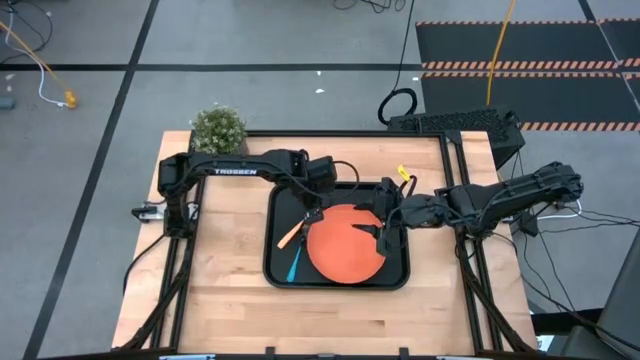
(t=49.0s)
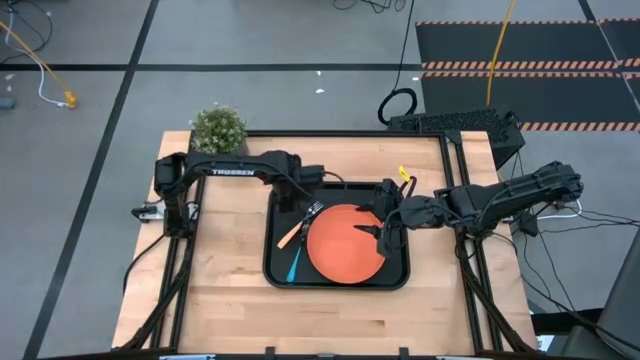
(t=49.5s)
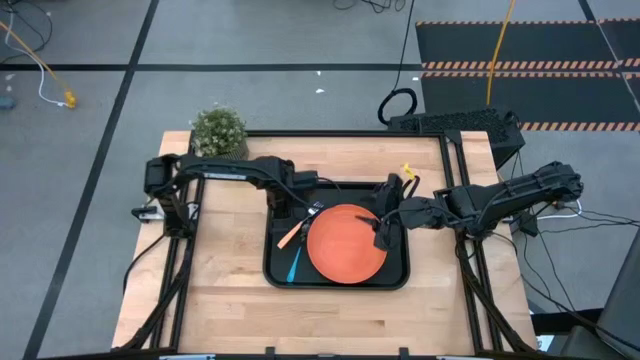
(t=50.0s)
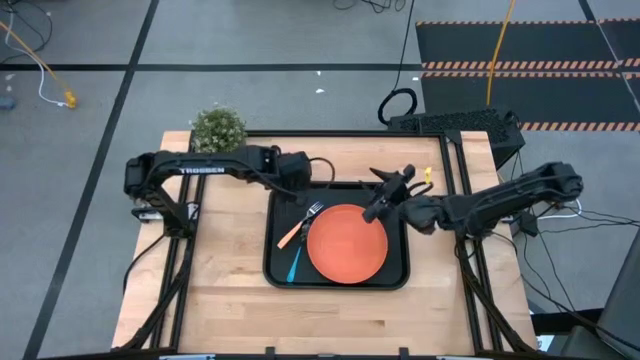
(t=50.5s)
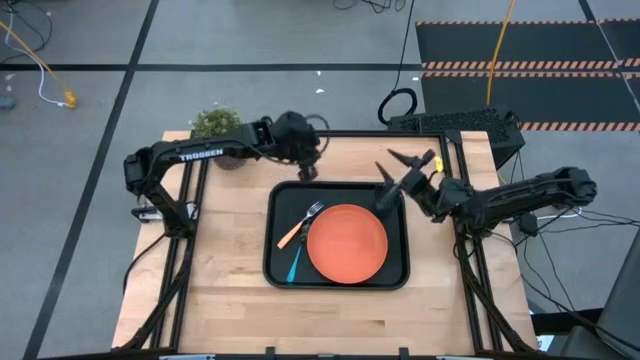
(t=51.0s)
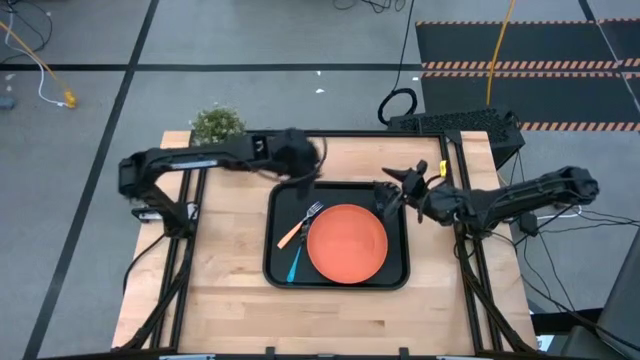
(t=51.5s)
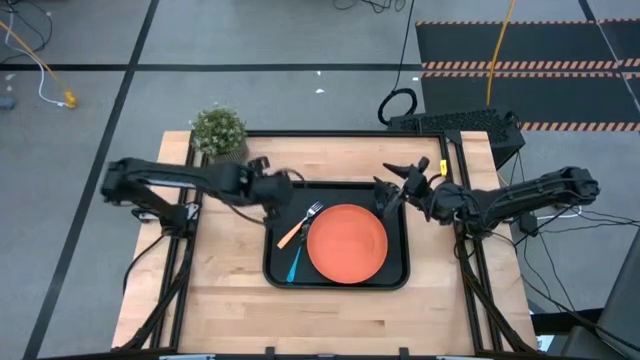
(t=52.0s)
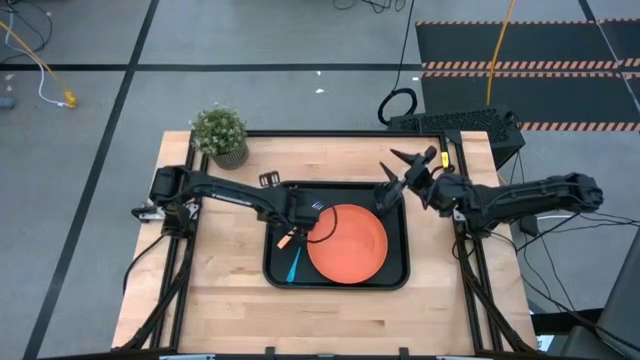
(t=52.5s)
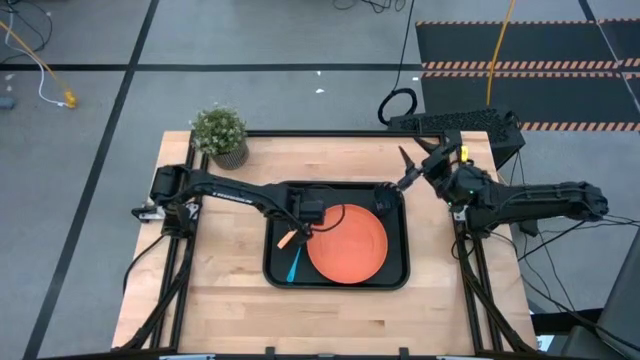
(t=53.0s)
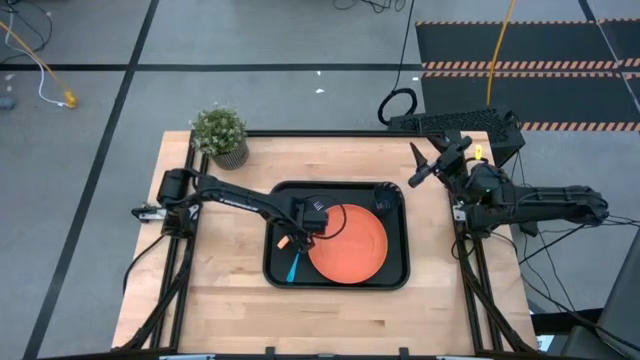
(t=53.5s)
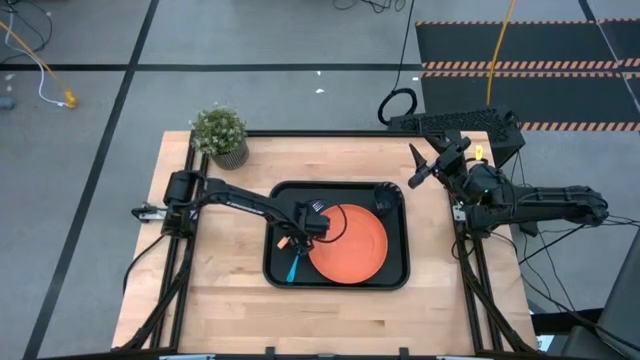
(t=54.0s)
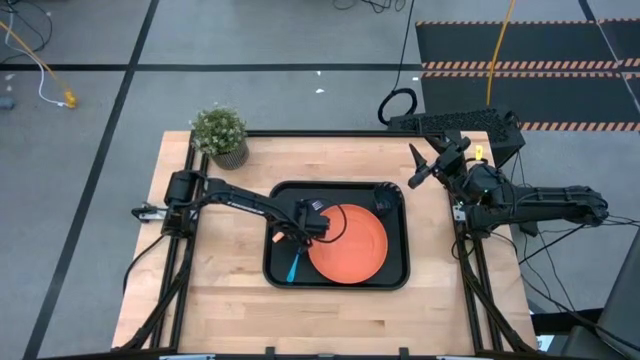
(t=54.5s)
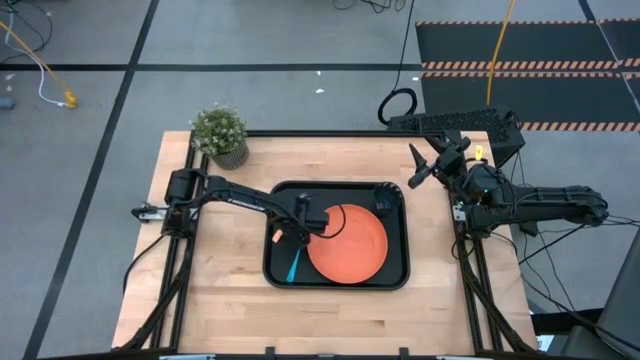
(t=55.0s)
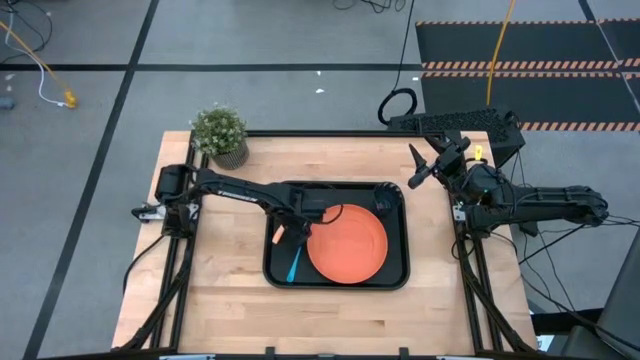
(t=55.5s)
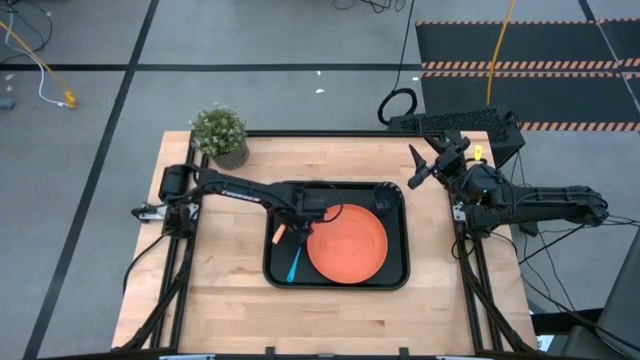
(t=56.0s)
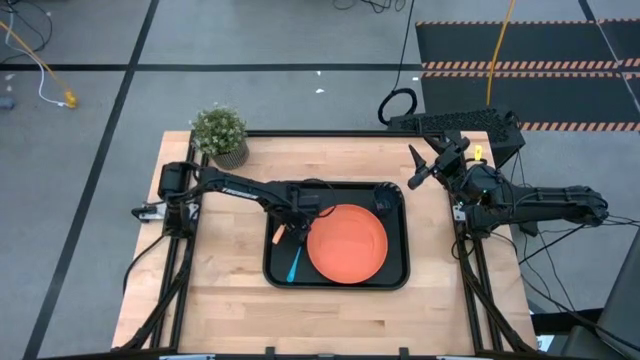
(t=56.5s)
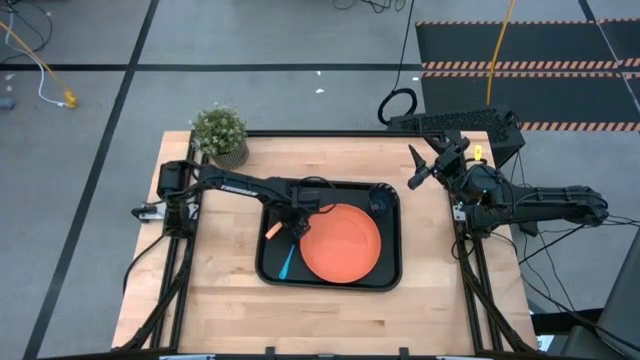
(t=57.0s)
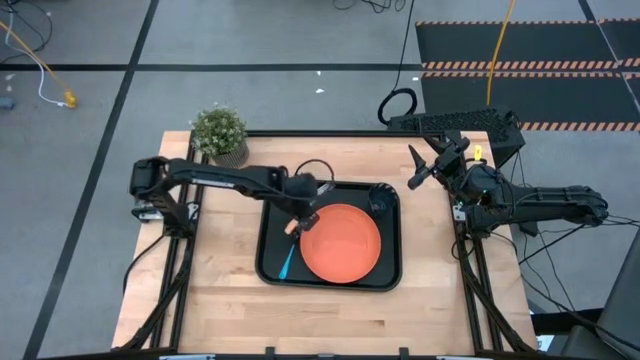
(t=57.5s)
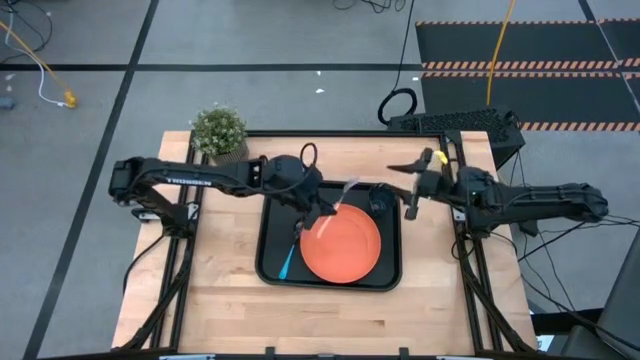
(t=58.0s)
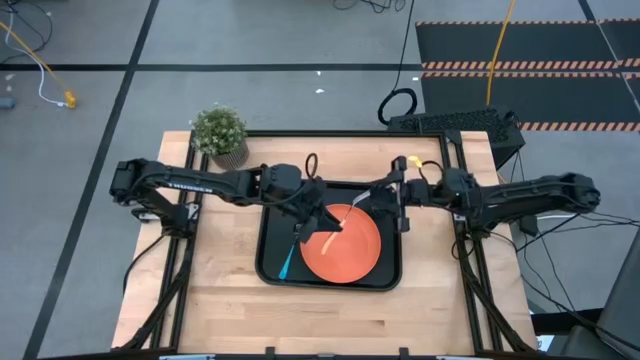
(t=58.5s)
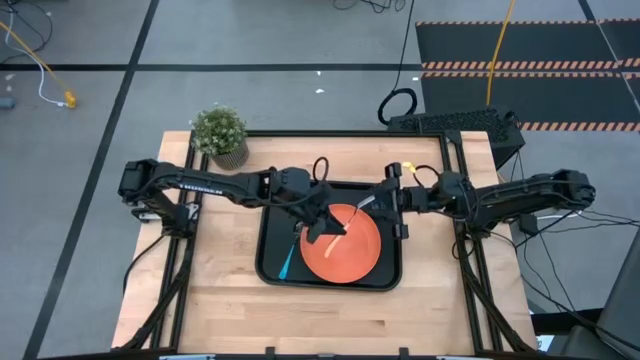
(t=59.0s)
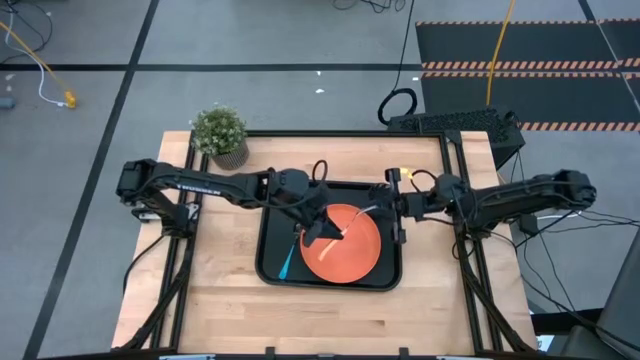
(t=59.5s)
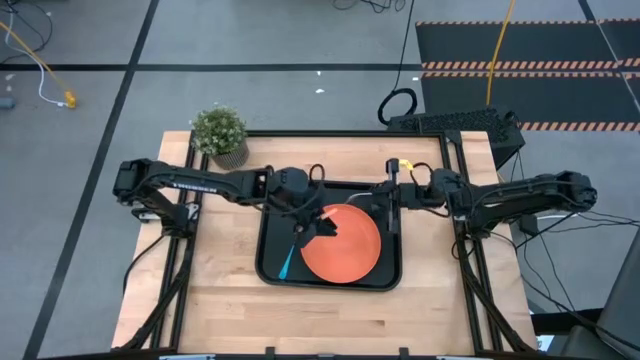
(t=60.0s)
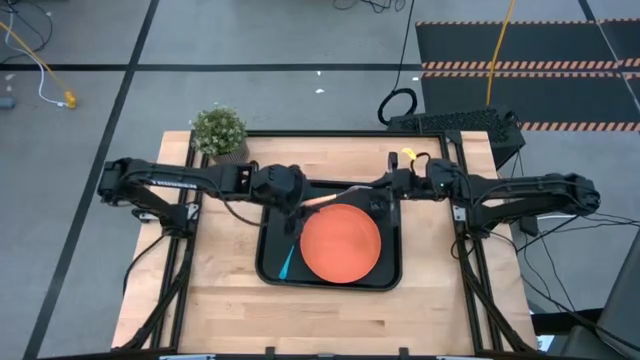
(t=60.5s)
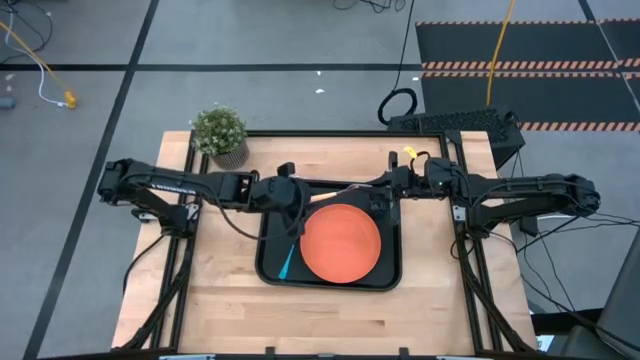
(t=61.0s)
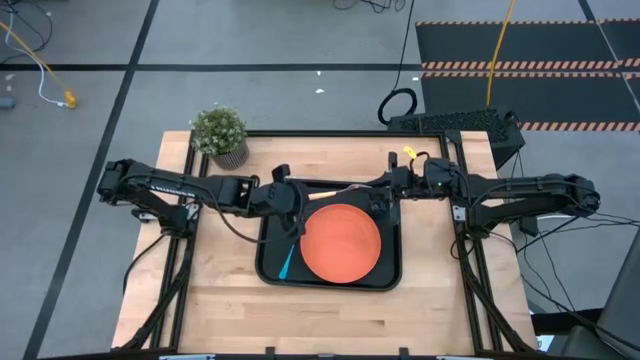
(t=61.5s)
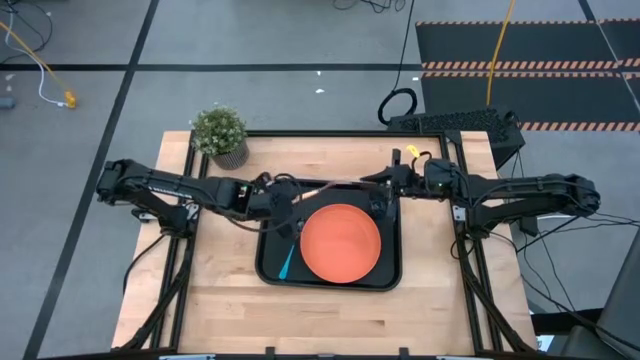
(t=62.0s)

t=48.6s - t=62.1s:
Task: Pick and place plate/cup/fork/spoon on tray
Adjust the orange fork on the black tray

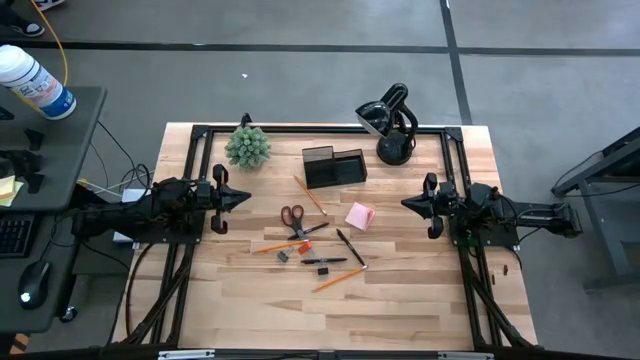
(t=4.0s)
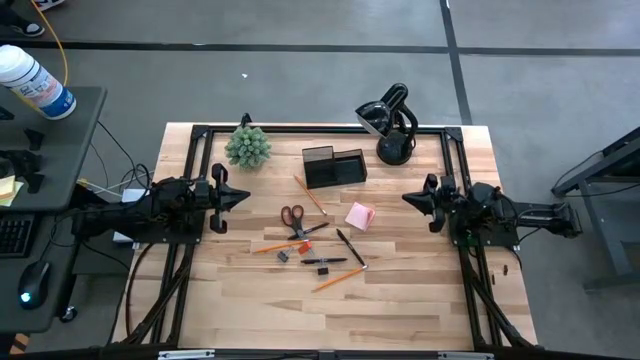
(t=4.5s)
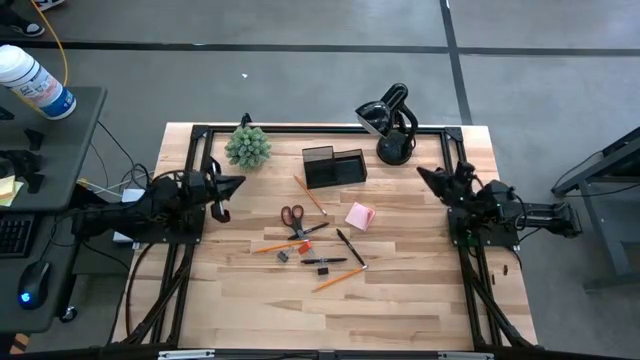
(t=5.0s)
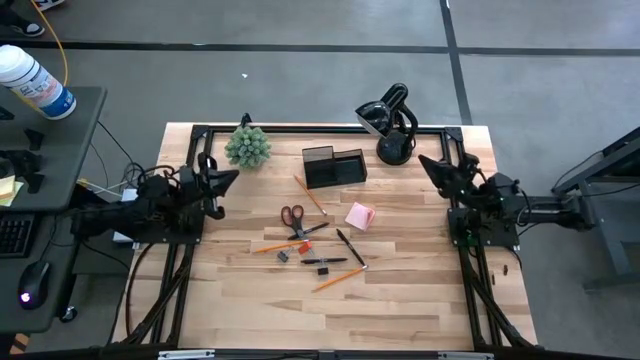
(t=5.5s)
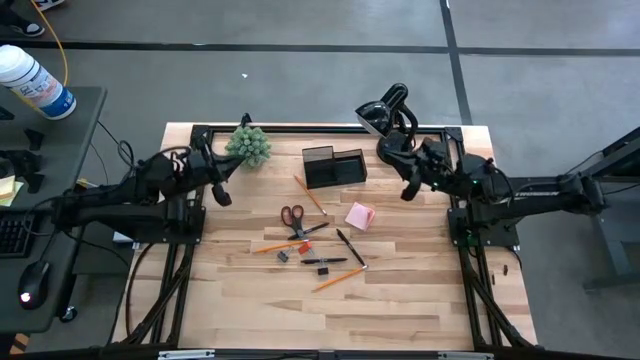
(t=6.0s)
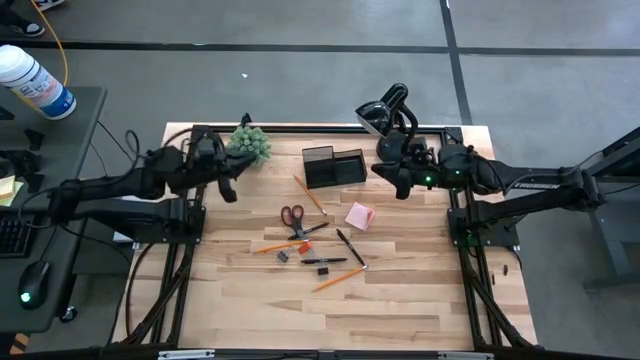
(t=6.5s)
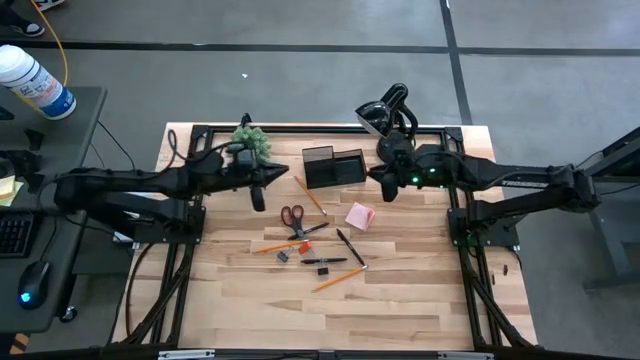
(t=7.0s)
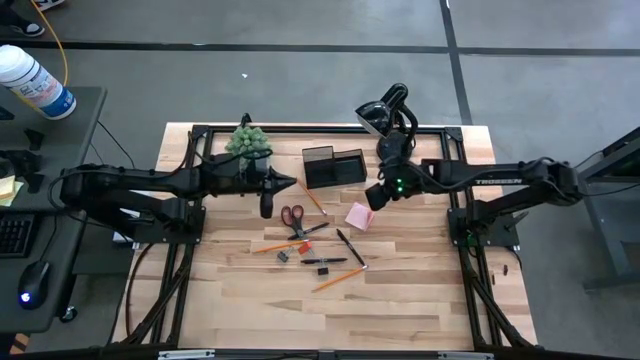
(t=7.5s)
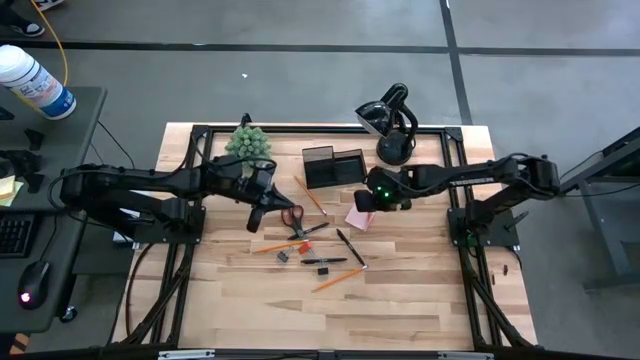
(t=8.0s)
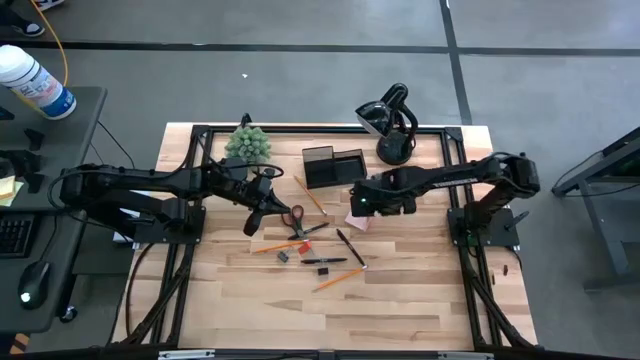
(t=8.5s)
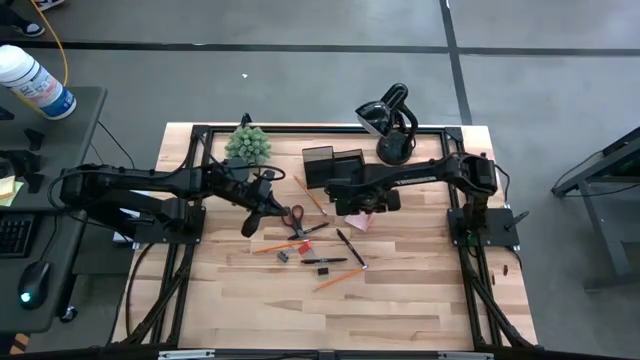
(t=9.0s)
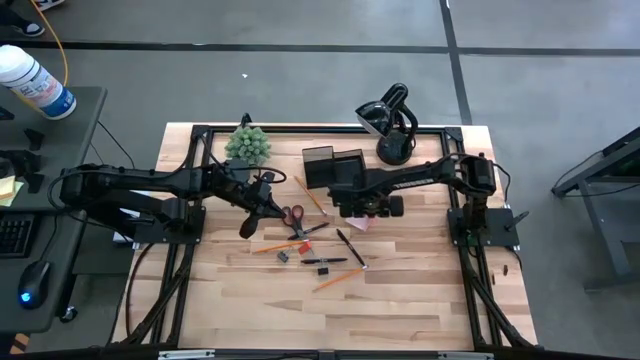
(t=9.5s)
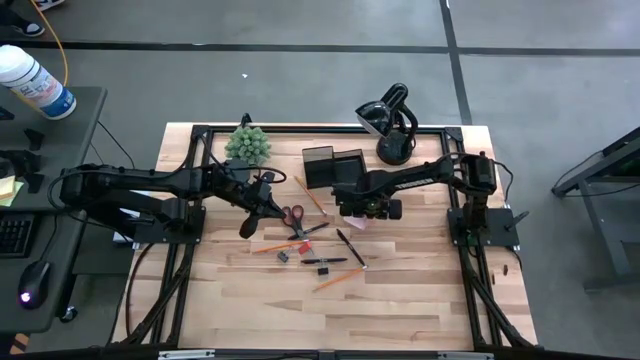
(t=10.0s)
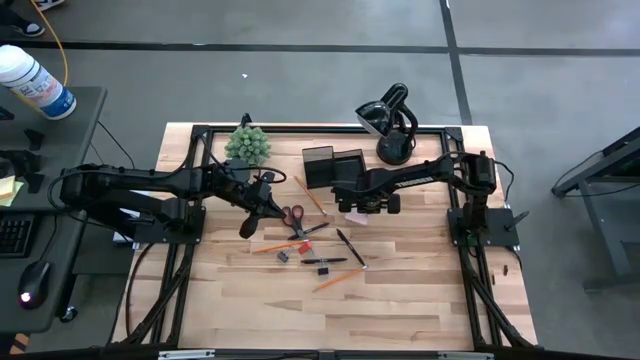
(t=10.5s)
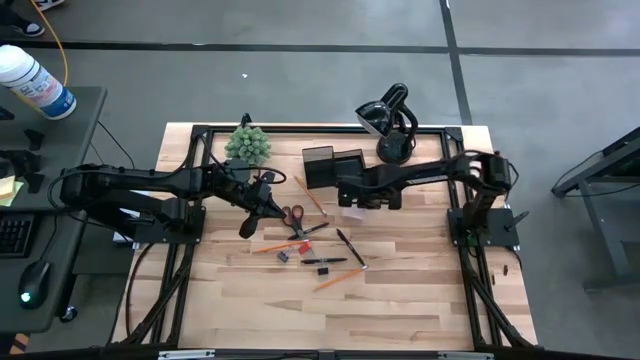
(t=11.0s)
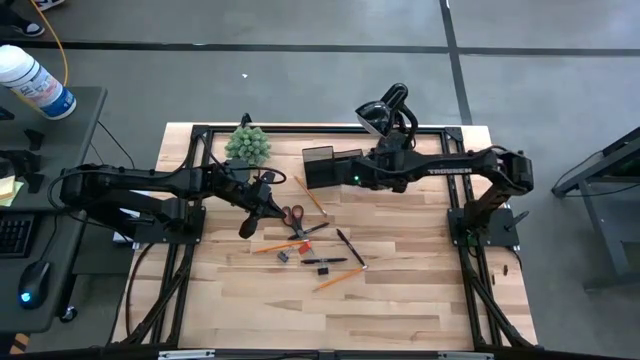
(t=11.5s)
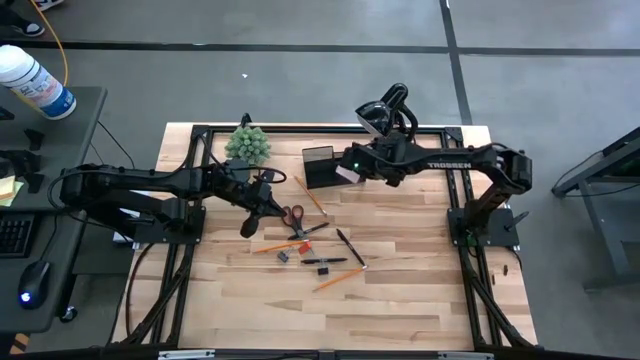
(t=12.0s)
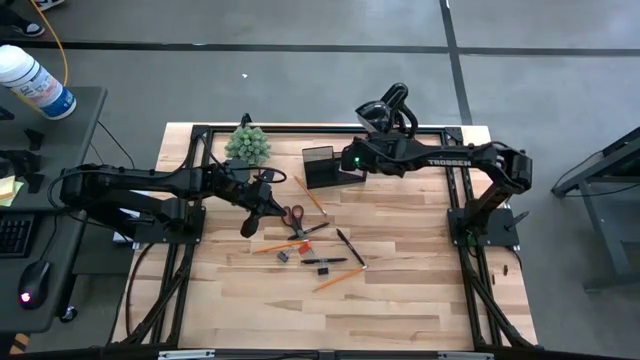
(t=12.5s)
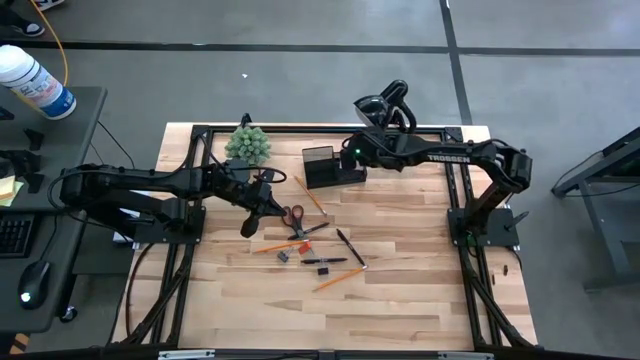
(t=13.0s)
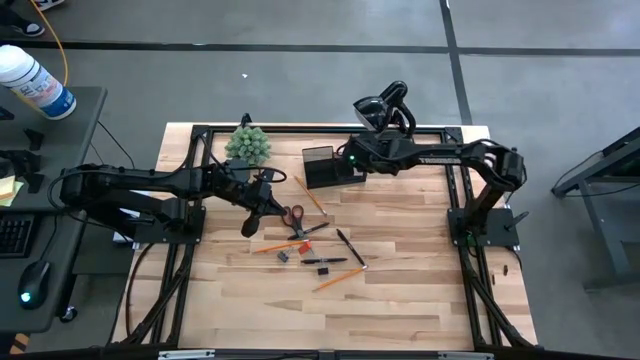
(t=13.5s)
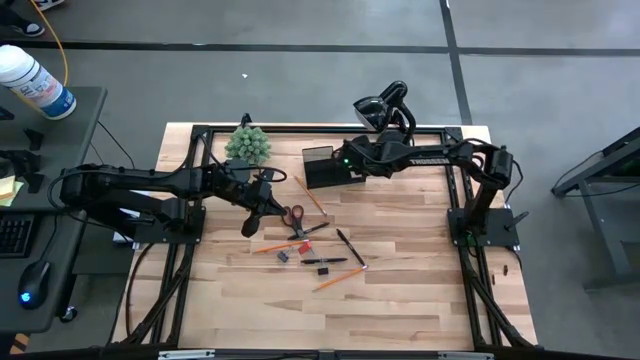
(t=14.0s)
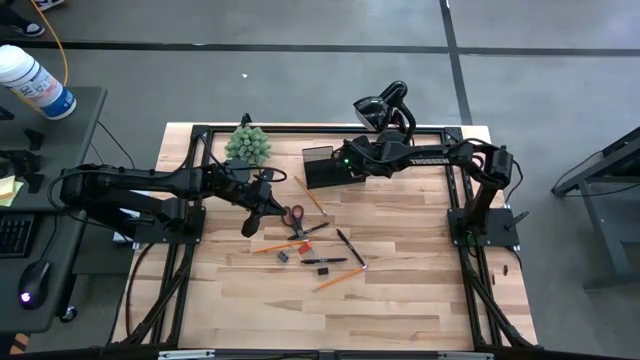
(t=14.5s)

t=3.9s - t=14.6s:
Task: Pick and place office supplies into organizer
Put the pink sticky notes into the black desk organizer
